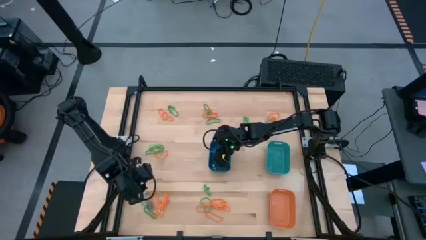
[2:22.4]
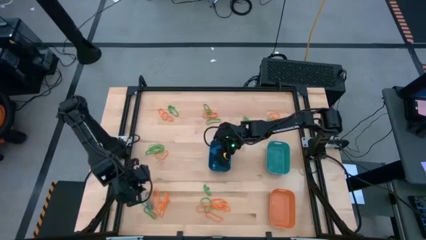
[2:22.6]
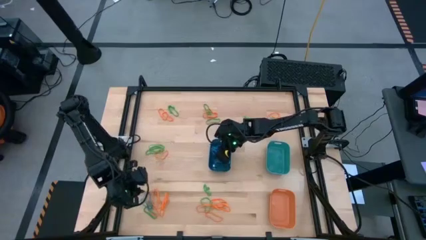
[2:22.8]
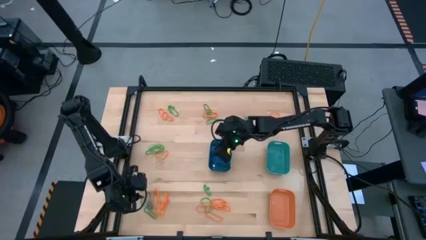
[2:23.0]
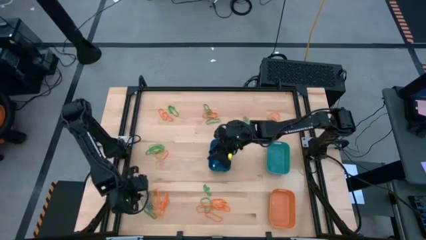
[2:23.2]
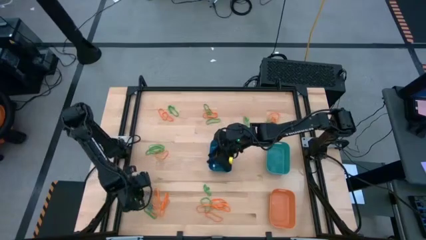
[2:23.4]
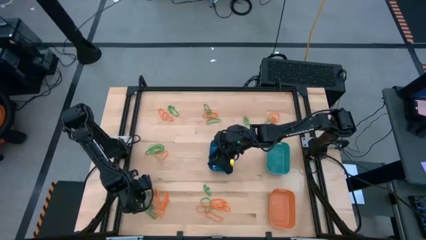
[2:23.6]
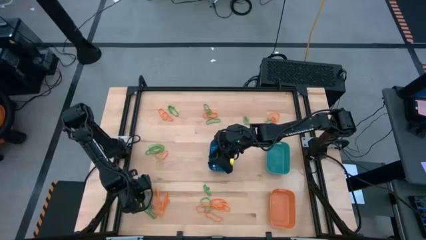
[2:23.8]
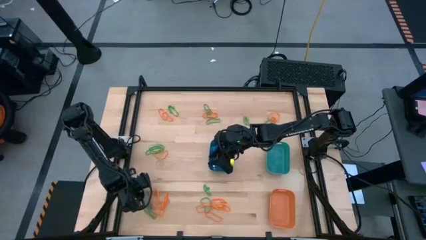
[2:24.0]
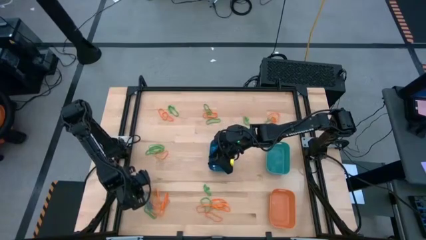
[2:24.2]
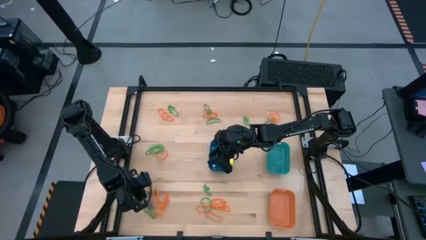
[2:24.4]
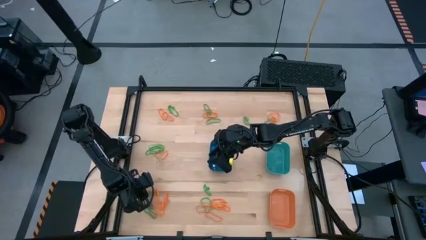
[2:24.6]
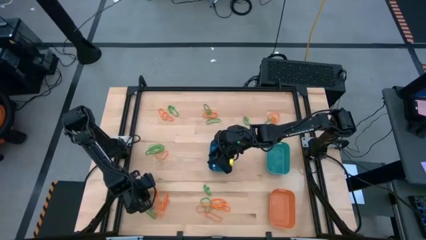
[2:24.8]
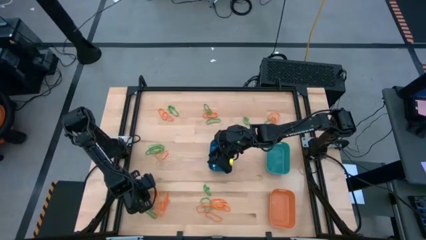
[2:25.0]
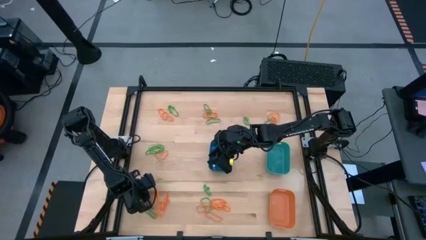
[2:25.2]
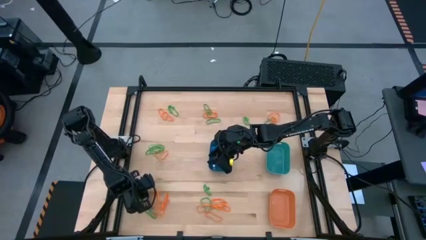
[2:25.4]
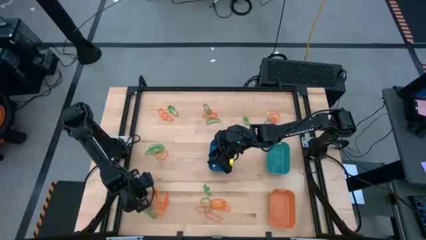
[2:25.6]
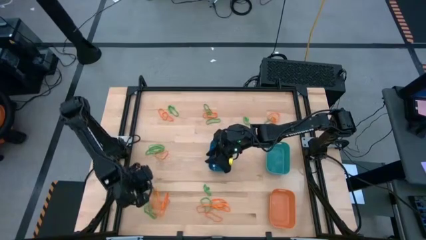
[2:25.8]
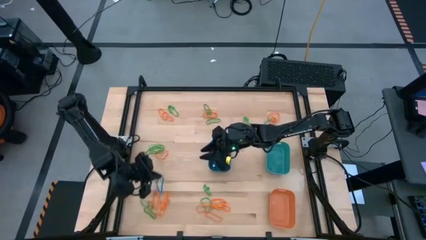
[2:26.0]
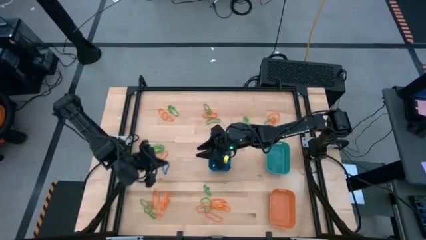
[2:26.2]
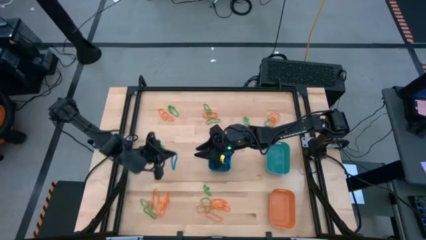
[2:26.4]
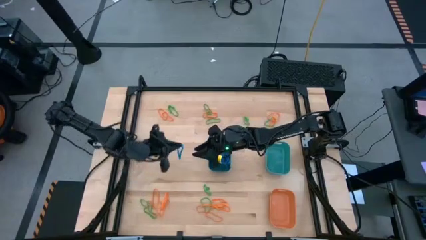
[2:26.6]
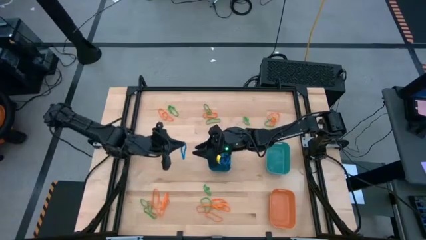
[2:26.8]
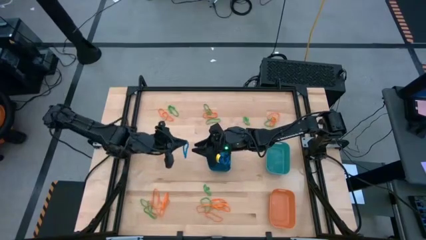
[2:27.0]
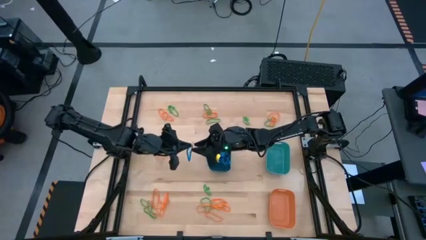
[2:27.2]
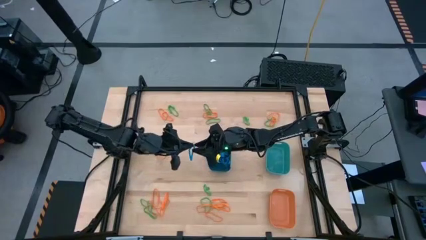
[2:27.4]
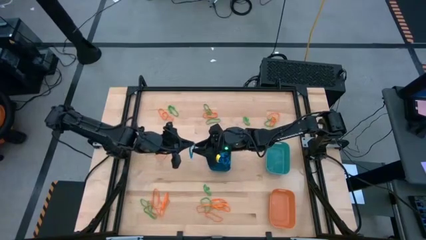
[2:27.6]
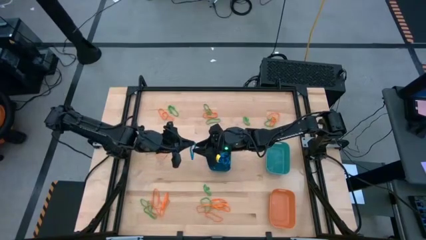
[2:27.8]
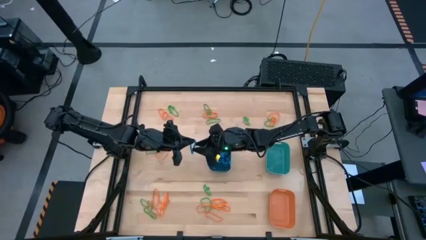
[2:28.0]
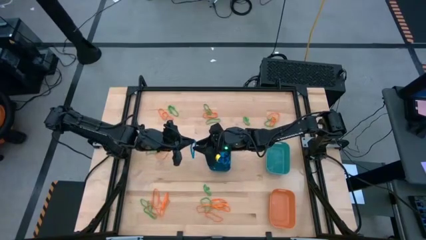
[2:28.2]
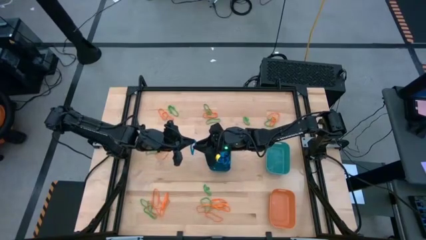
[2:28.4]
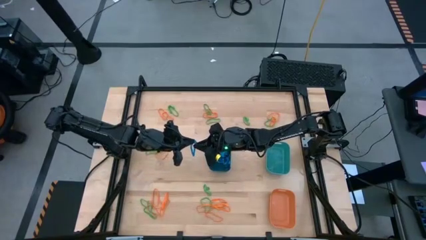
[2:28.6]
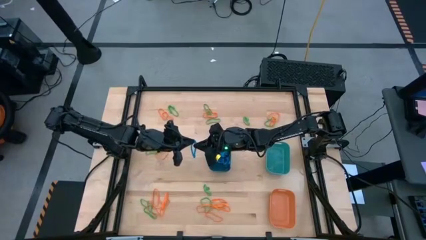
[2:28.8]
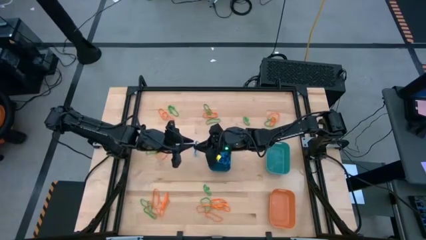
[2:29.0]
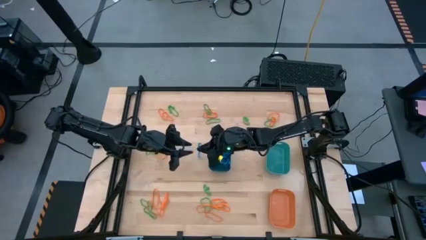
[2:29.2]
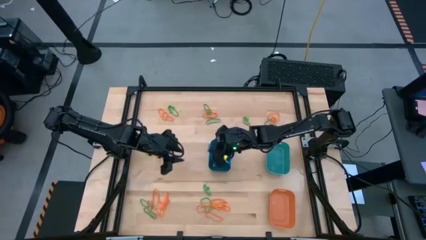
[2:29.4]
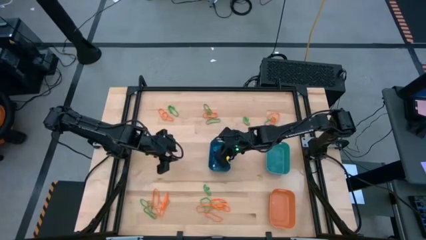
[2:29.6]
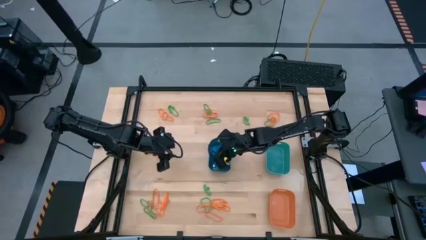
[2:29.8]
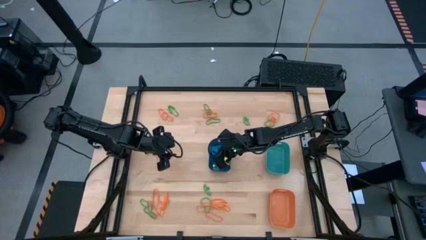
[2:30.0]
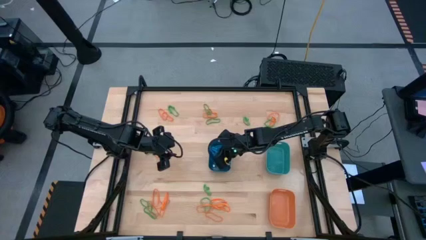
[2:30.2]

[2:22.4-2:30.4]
Task: Sort rubber bands into baskets
Put the blue rubberband into the blue bin

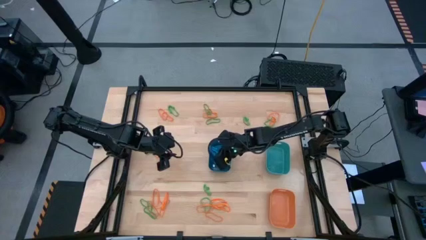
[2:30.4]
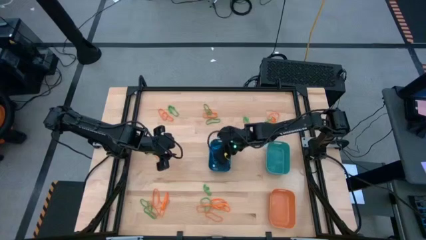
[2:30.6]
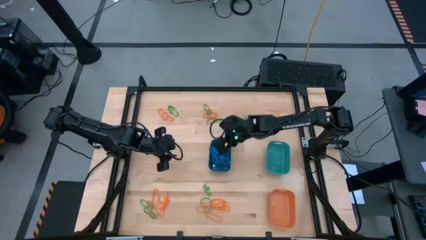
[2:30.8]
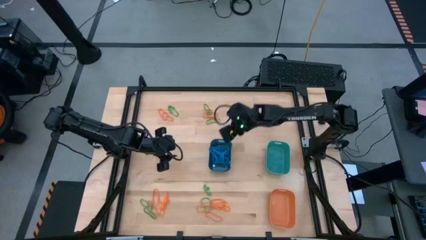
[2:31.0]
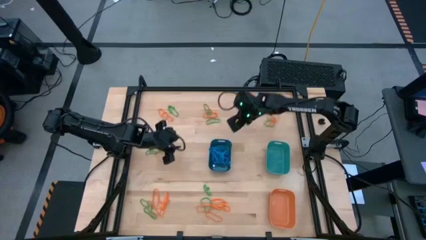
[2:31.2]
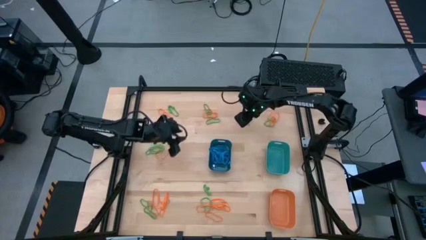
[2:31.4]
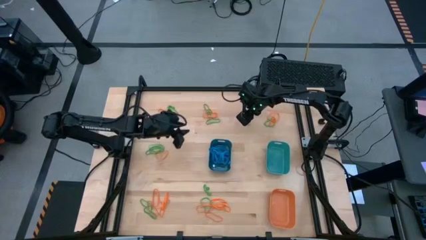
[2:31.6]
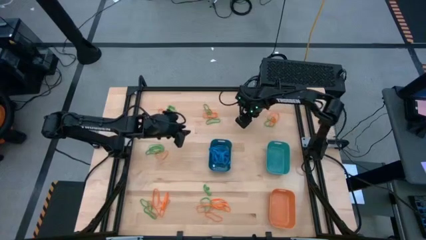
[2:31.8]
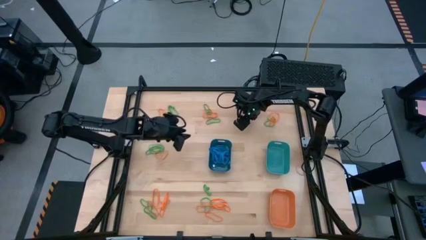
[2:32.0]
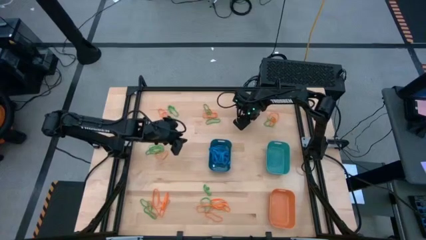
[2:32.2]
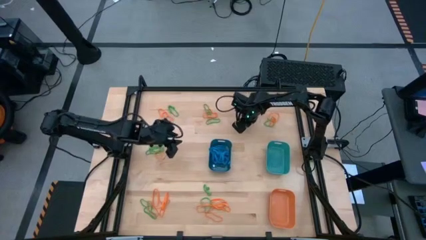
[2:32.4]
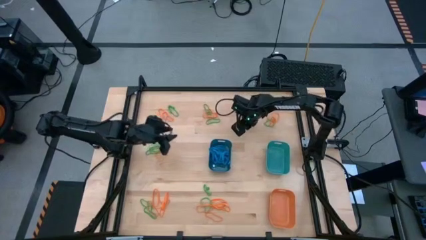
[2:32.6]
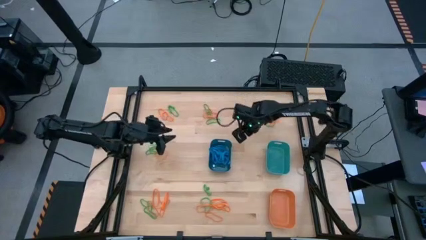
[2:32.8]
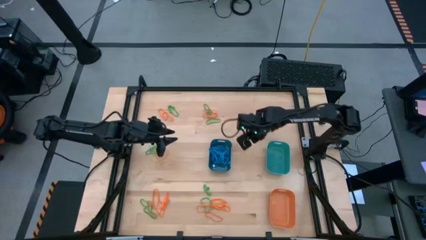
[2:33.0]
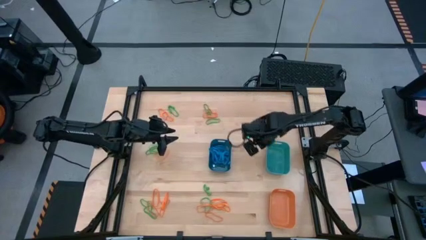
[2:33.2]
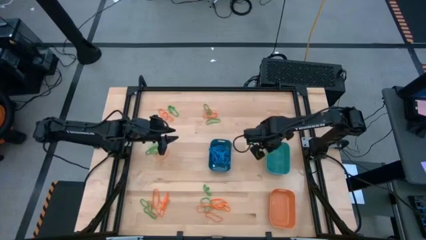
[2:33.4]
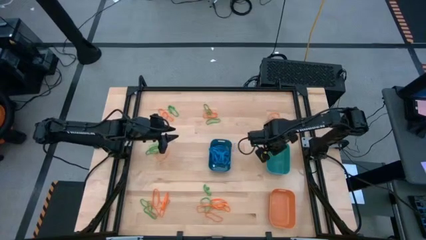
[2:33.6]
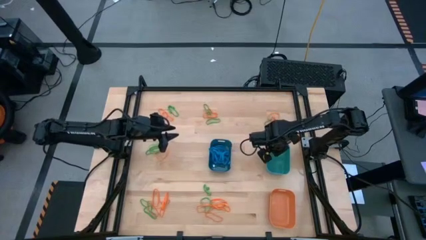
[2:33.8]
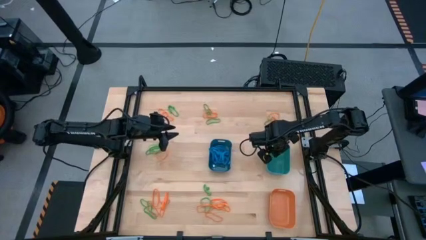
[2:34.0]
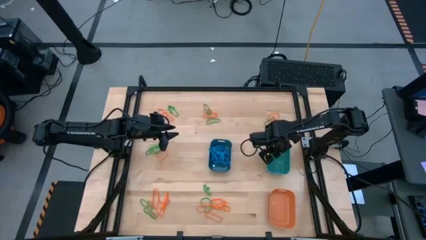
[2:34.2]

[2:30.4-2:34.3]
Put the green rubberband into the light blue bin

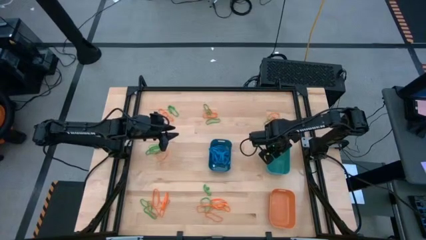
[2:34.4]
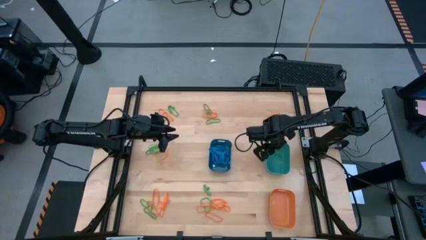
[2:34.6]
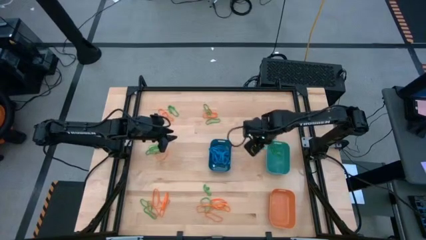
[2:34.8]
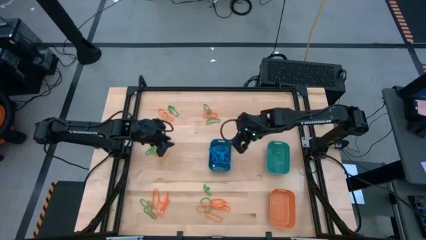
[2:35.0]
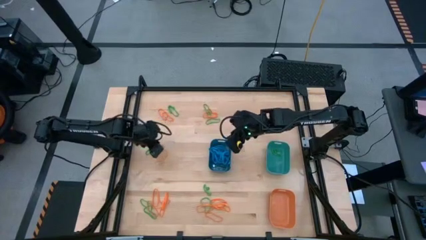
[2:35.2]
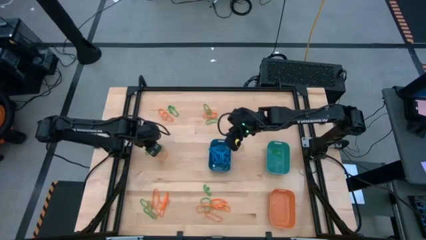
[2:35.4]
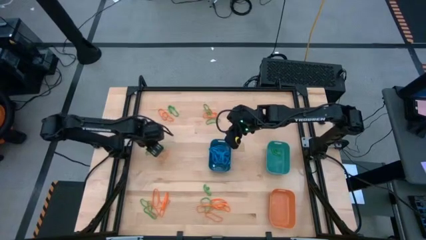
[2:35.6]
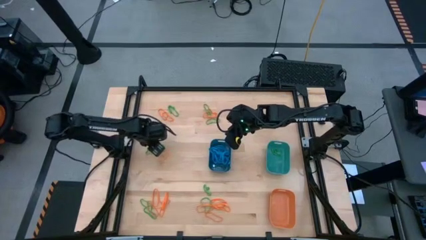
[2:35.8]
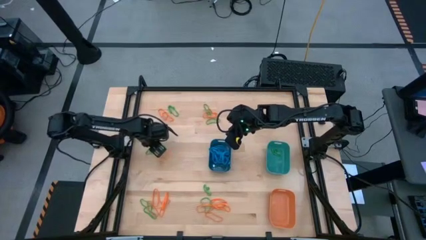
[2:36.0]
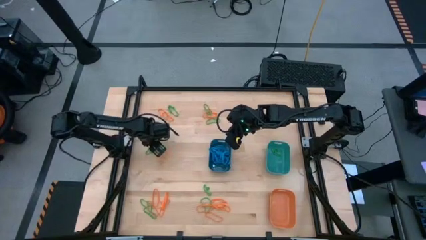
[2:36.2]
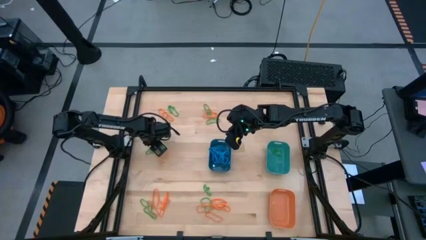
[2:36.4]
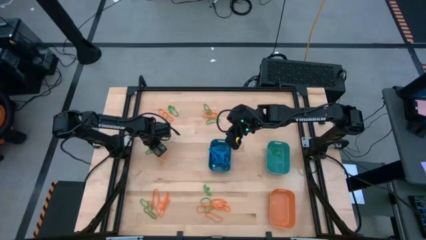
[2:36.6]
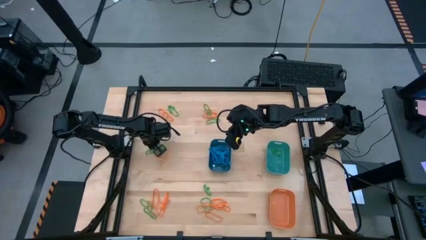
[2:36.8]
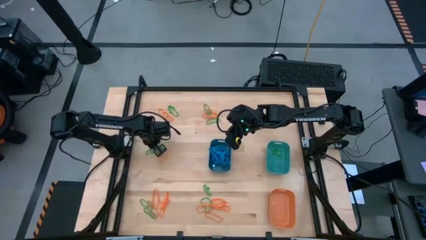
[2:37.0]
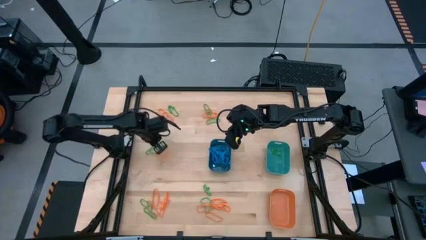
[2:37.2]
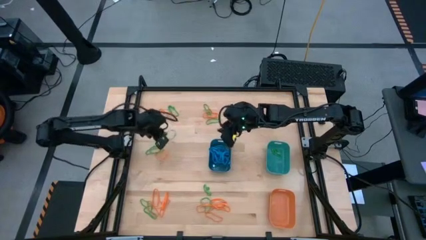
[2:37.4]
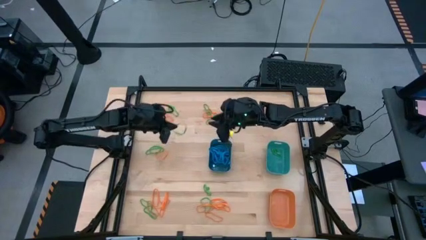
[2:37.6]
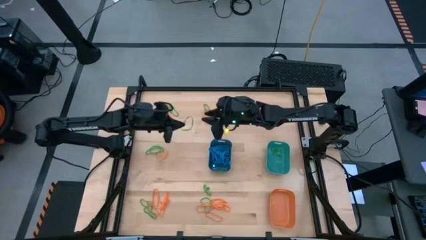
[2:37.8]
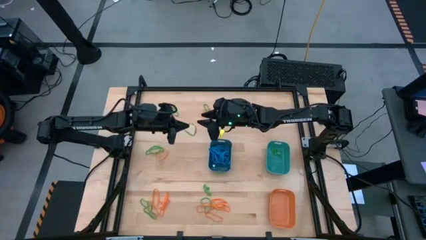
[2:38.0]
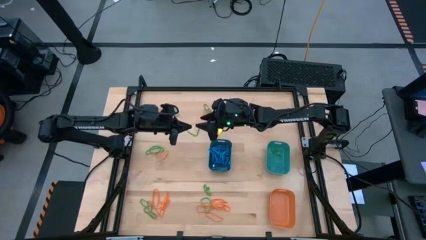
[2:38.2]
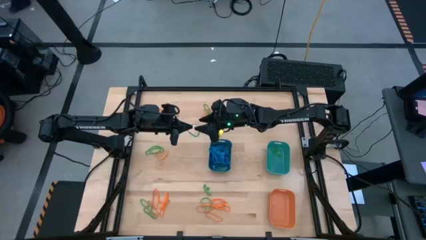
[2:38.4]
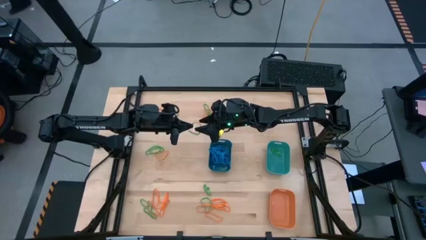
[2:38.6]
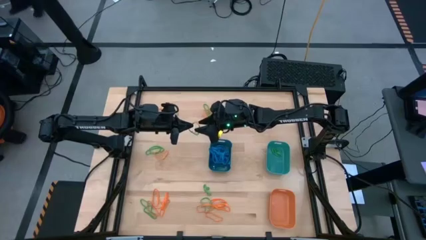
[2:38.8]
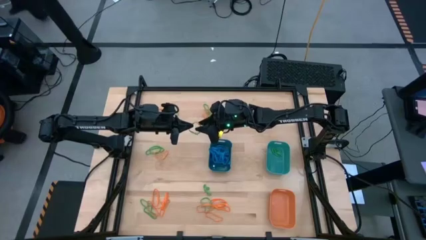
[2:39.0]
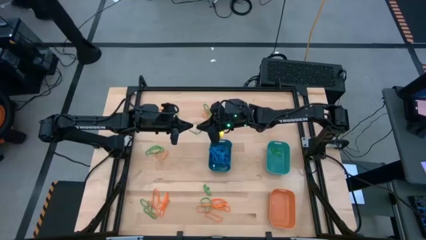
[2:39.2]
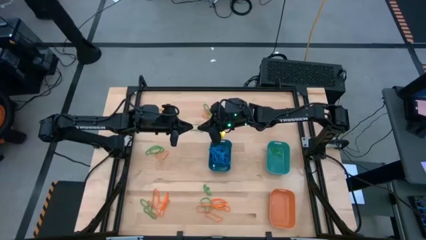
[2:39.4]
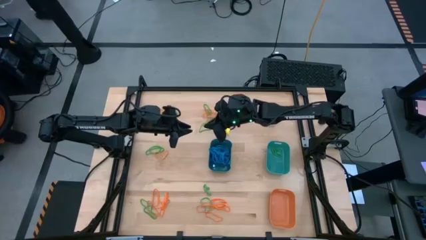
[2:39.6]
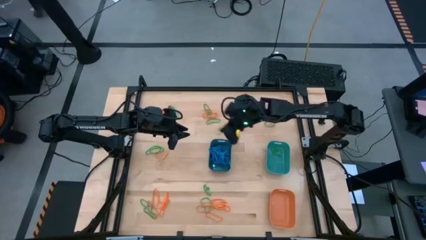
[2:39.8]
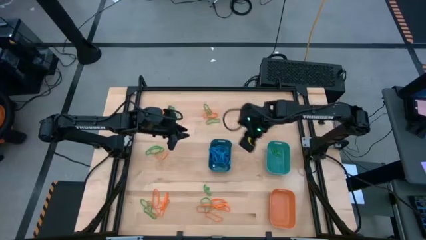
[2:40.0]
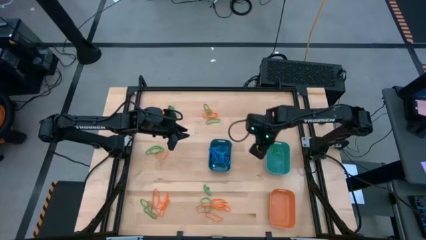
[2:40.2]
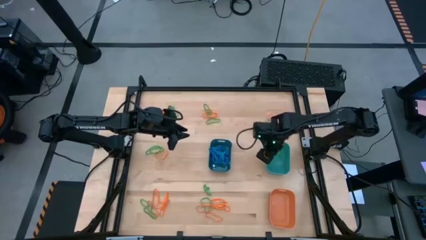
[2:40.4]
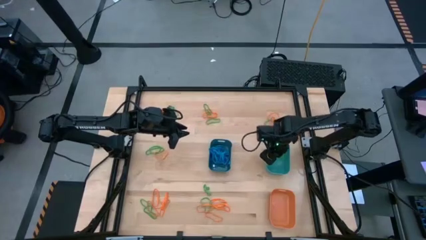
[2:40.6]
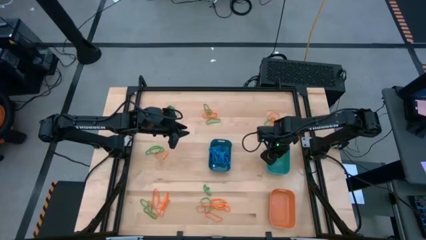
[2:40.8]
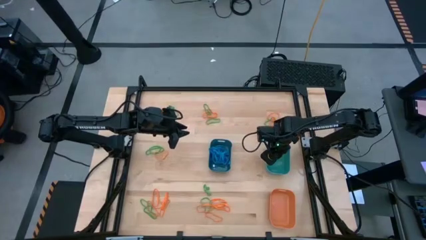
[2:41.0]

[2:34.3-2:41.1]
Put the green rubberband into the light blue bin
